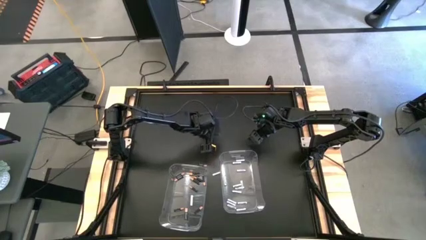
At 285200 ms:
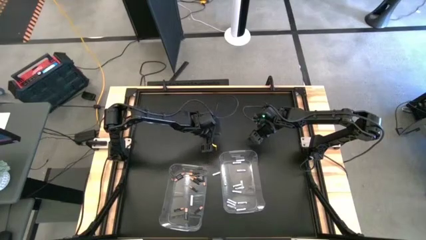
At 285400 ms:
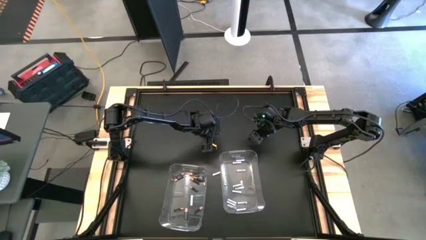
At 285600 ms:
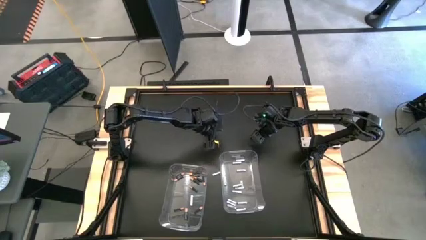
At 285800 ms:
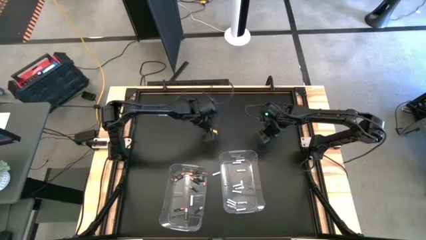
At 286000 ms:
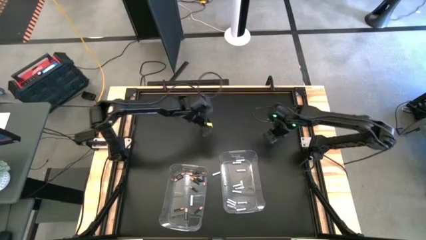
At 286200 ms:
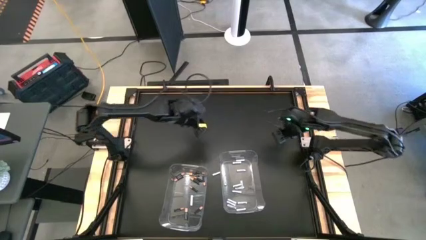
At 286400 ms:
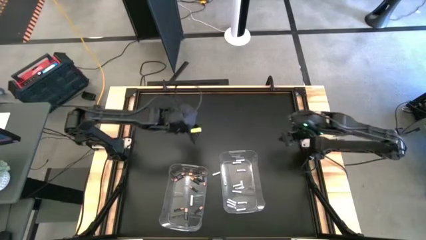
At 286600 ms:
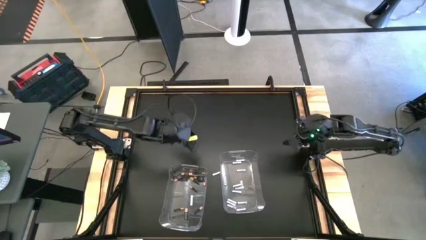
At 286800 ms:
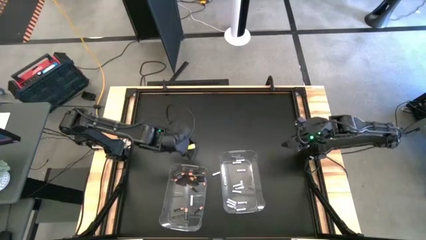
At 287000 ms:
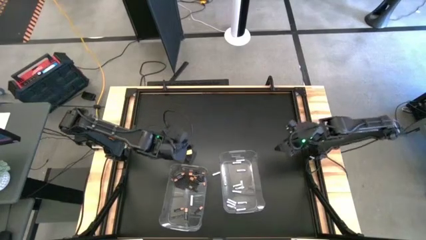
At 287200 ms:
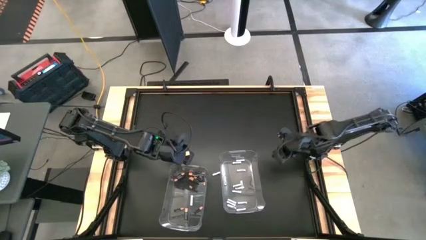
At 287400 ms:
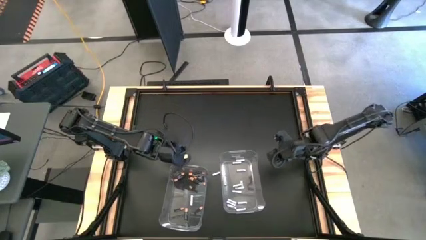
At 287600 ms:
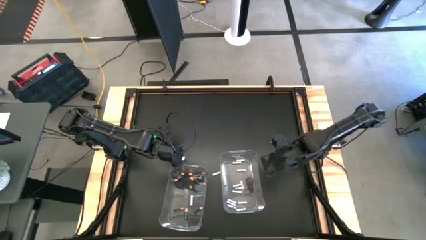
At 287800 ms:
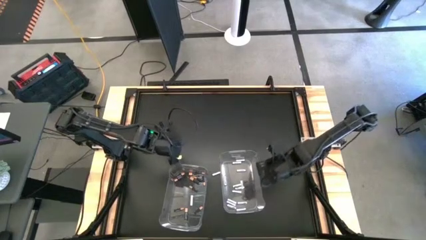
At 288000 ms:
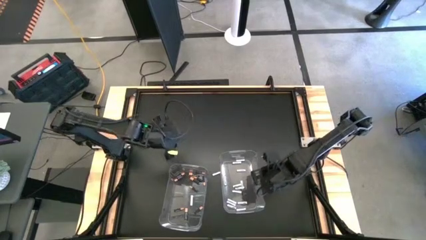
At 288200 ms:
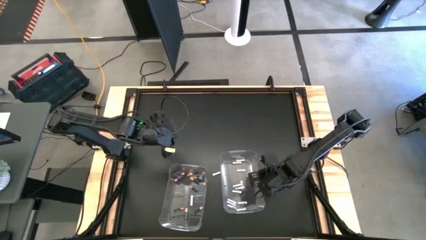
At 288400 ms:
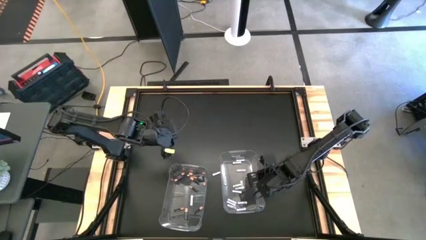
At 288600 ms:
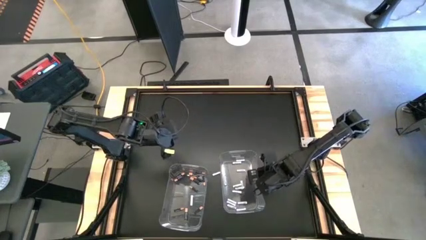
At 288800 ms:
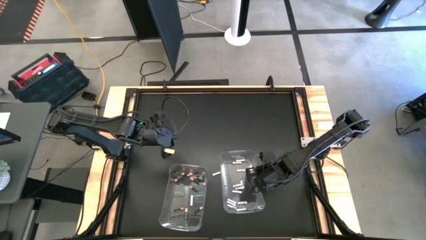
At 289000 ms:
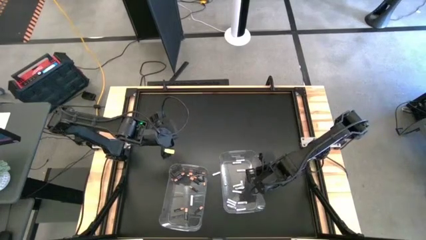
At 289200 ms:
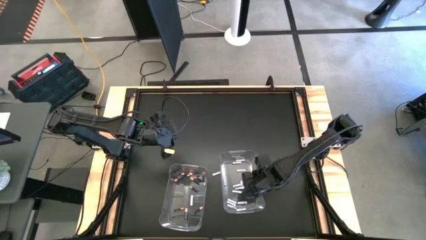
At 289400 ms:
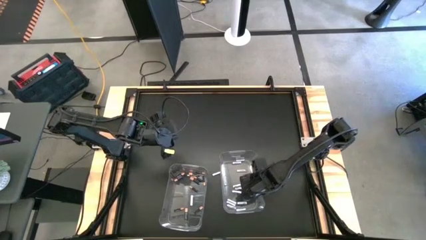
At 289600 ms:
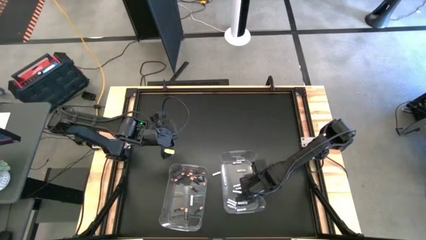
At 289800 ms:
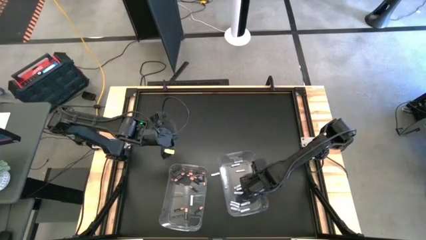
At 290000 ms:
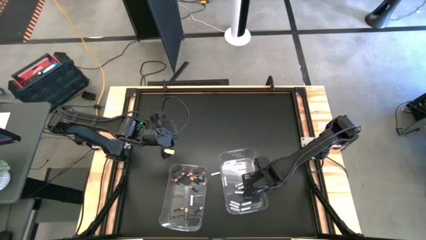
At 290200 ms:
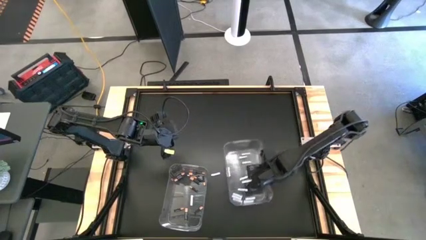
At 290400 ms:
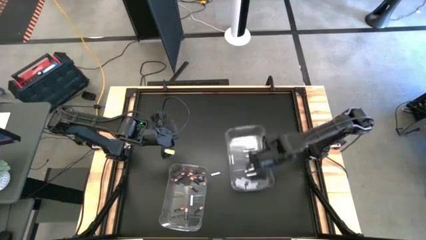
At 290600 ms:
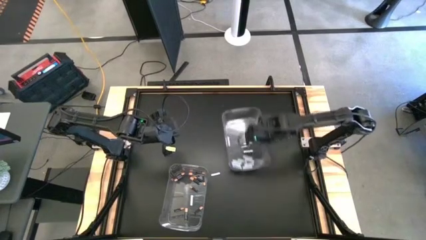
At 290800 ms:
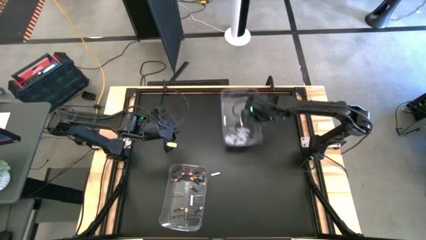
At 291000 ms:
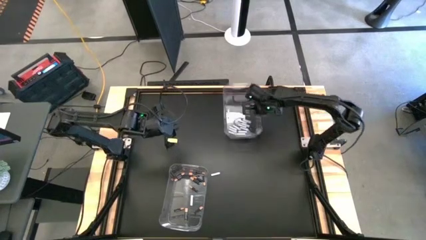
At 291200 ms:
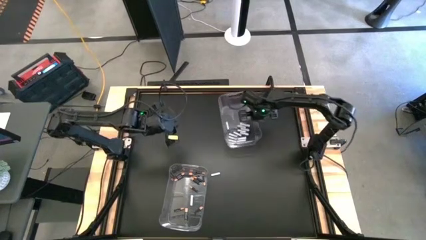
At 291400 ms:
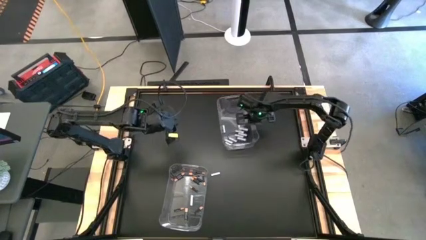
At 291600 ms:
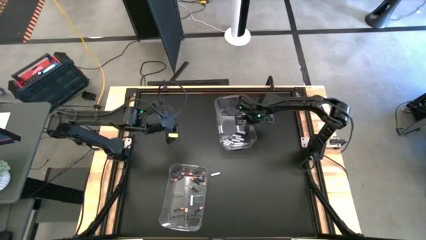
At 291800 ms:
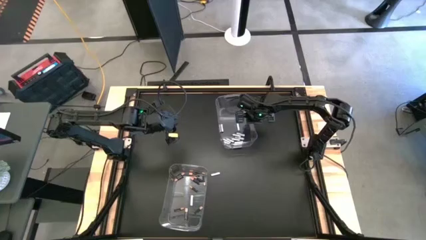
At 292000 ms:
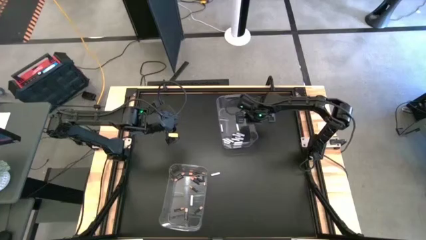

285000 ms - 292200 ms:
Task: Sort batteries
Move the right transparent bin to the top of the table

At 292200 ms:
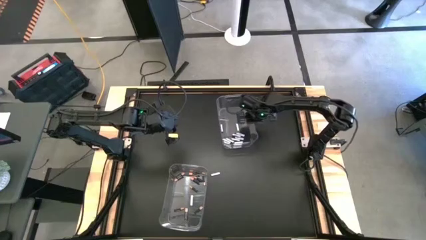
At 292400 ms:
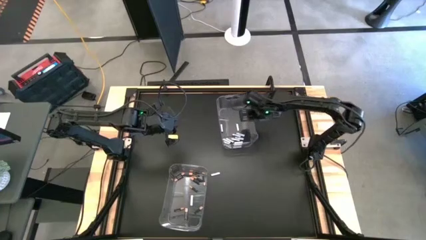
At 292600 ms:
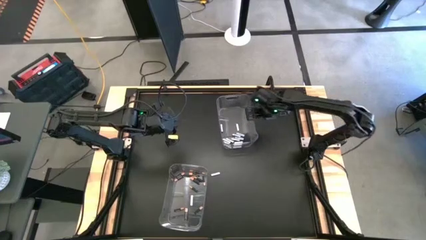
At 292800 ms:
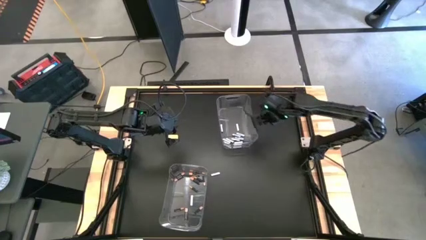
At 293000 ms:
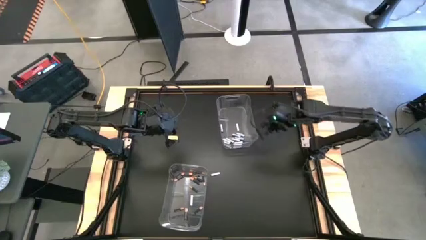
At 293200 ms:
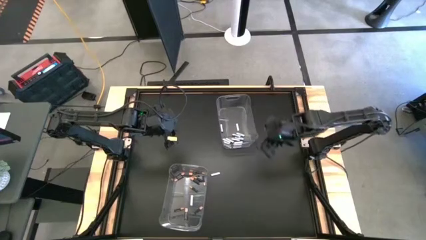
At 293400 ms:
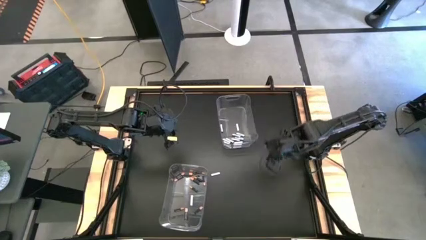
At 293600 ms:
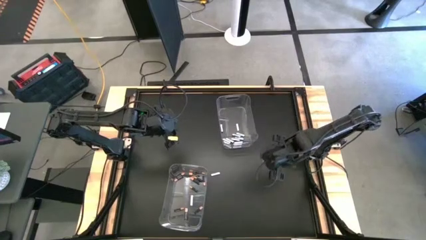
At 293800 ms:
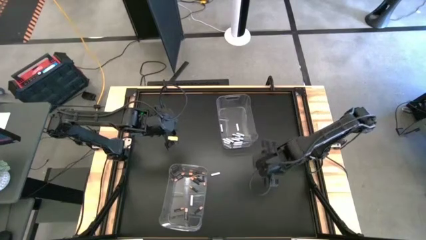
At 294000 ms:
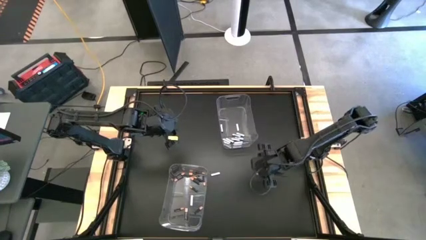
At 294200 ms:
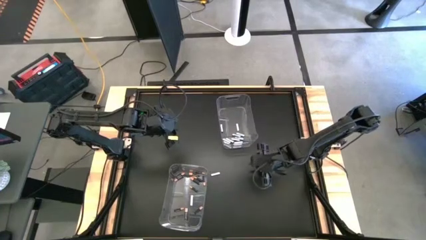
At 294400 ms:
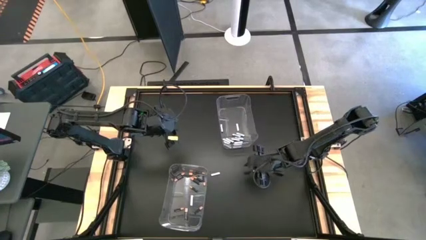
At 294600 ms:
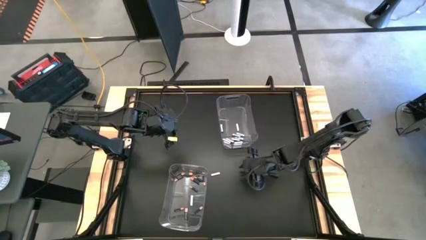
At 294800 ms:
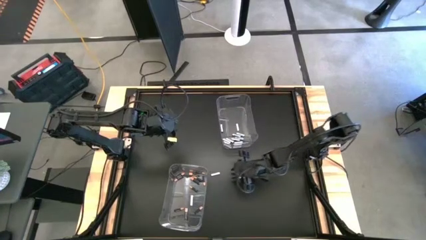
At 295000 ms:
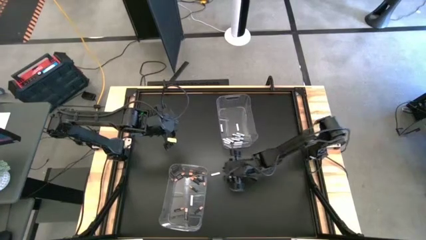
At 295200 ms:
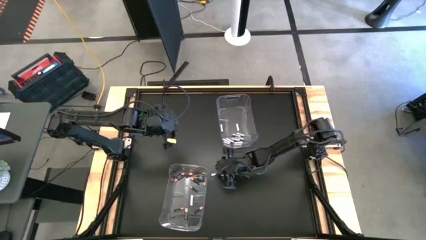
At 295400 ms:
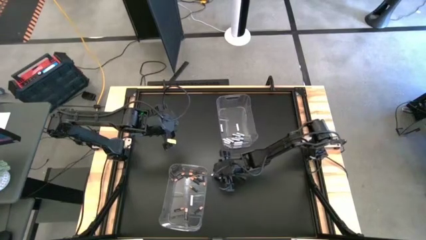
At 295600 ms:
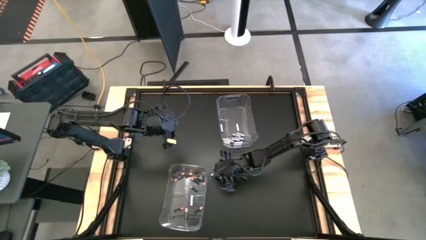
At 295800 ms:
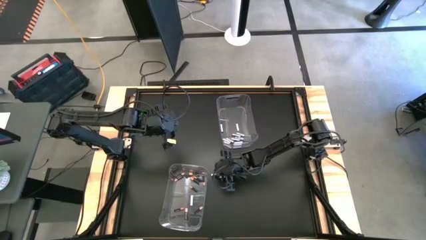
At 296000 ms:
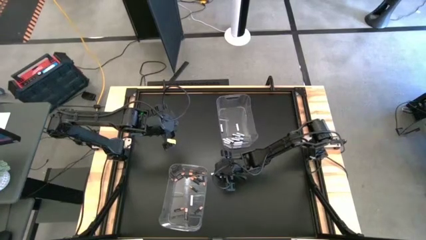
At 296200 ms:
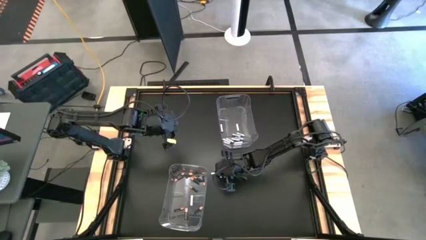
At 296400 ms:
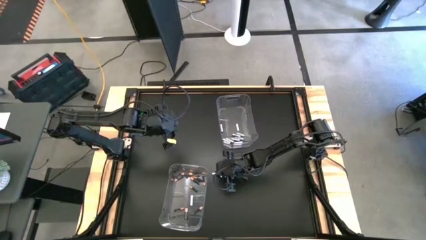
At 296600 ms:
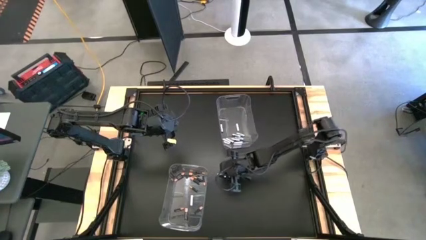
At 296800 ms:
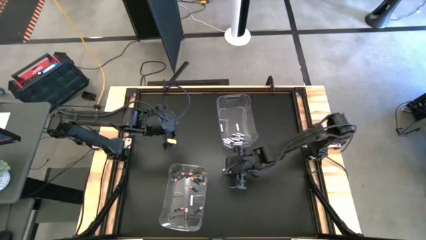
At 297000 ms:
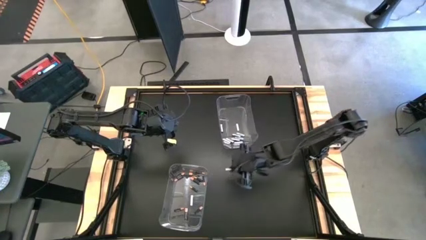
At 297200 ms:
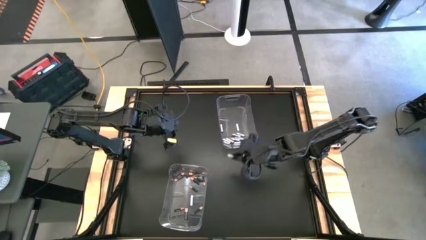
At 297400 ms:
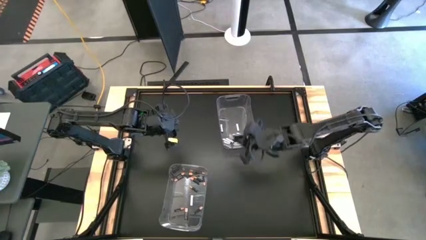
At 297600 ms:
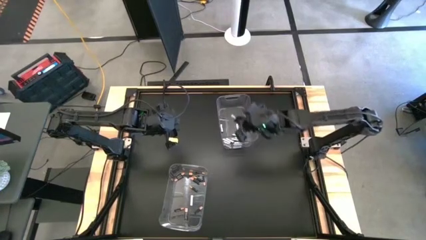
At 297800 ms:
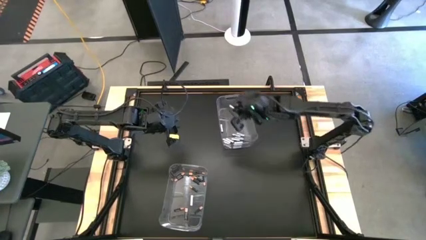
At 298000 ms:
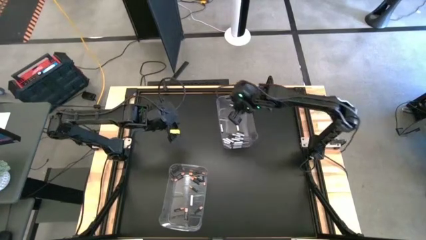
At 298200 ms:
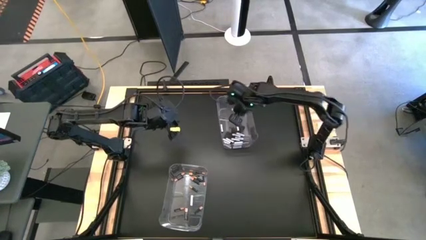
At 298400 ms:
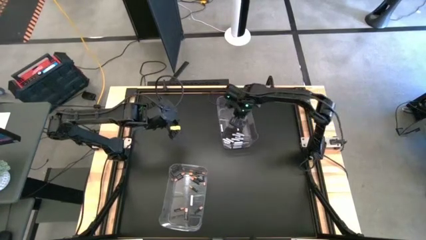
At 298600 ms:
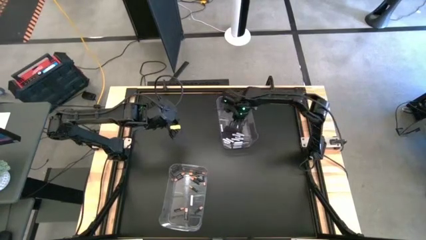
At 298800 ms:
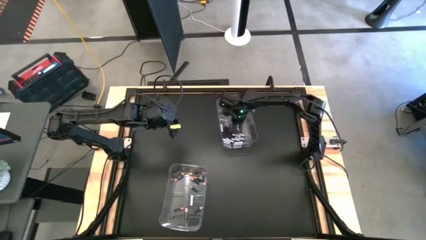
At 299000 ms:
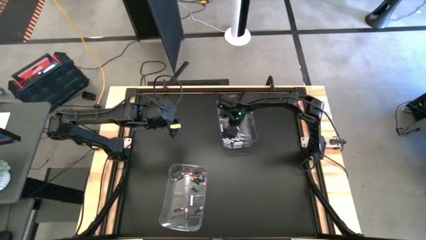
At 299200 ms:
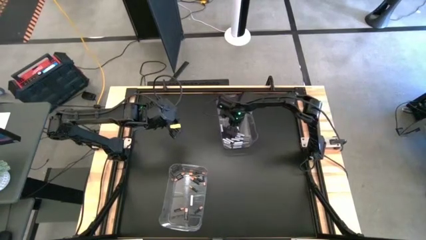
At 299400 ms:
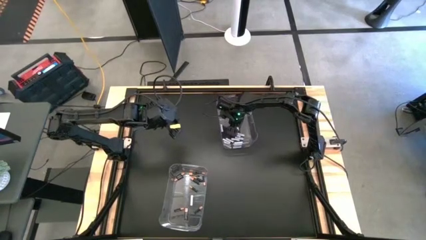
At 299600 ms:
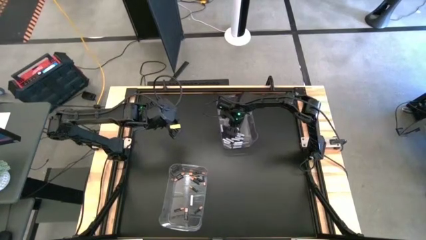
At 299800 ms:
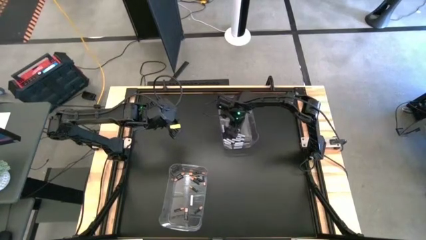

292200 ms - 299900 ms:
Put the white battery into the top transparent bin
